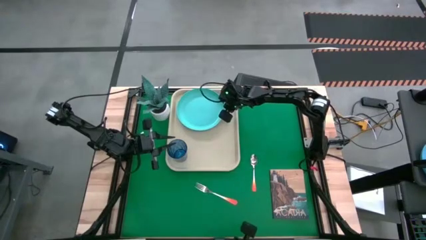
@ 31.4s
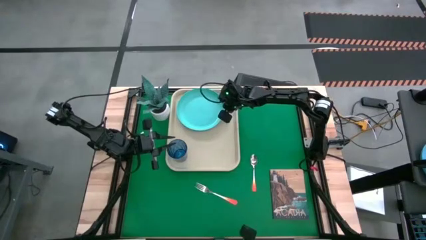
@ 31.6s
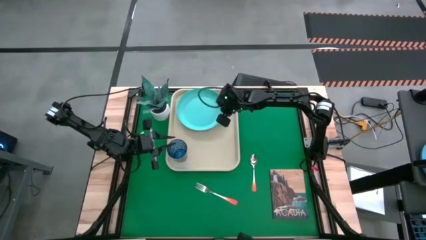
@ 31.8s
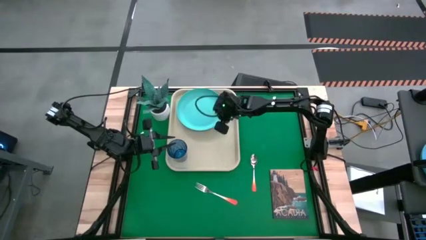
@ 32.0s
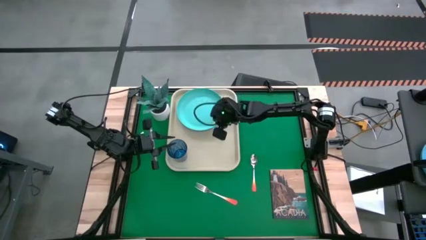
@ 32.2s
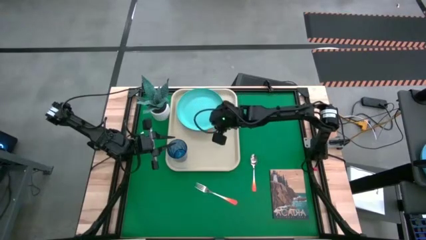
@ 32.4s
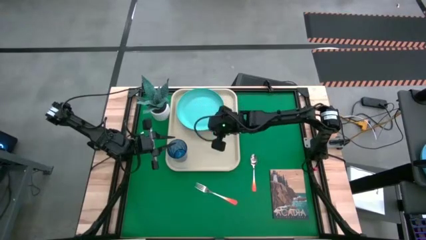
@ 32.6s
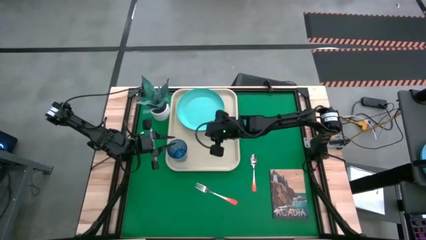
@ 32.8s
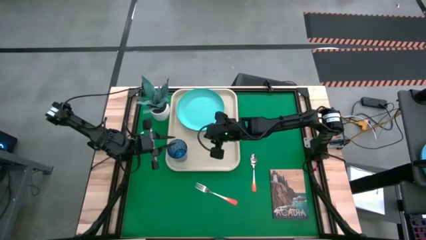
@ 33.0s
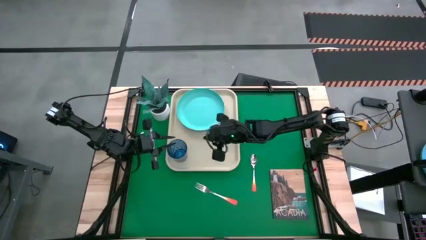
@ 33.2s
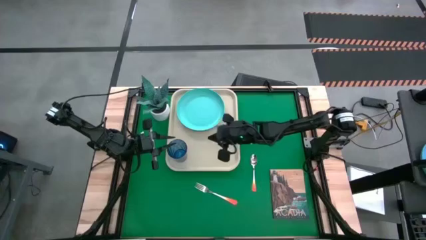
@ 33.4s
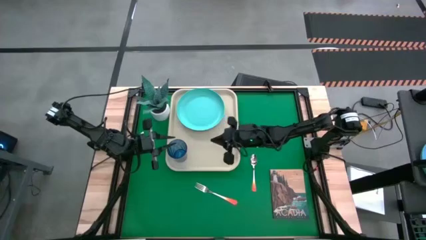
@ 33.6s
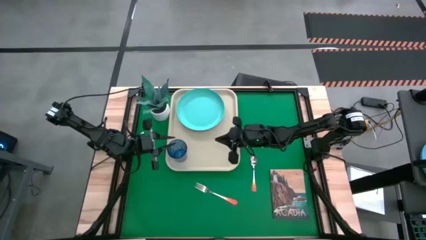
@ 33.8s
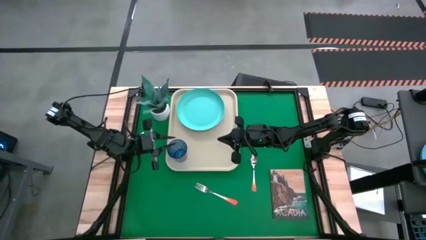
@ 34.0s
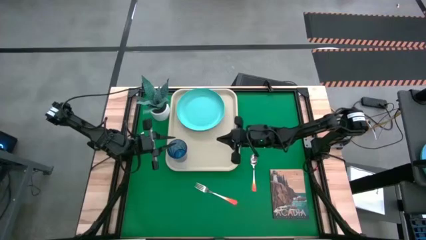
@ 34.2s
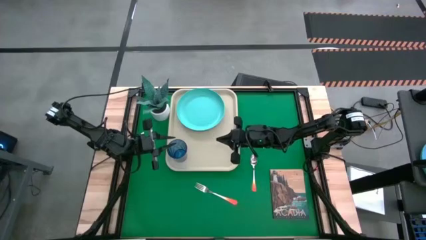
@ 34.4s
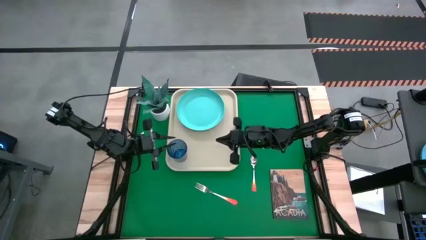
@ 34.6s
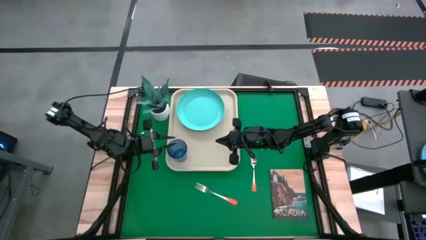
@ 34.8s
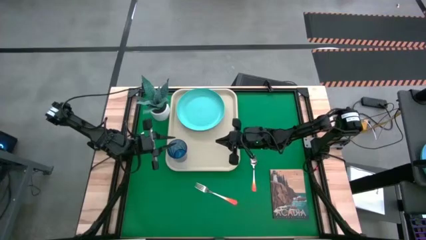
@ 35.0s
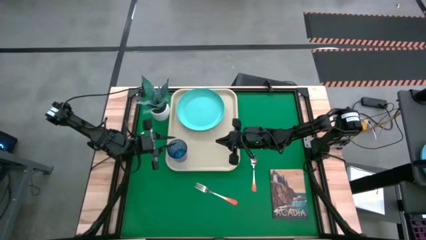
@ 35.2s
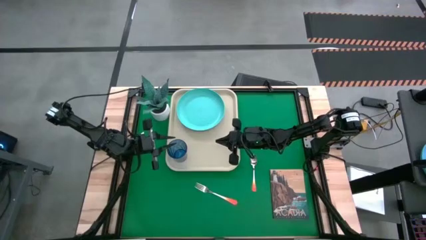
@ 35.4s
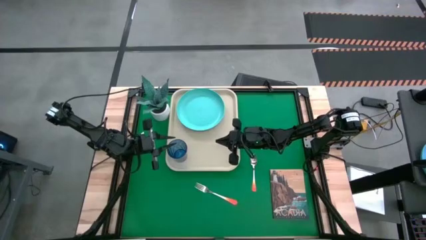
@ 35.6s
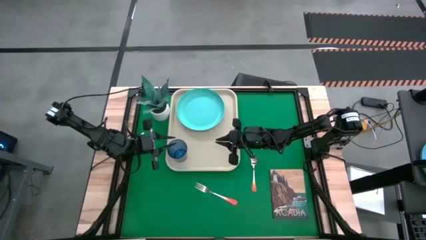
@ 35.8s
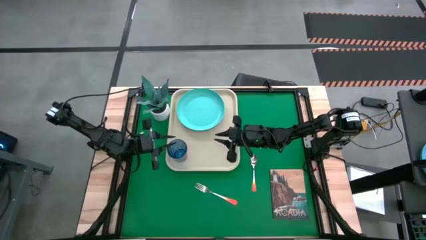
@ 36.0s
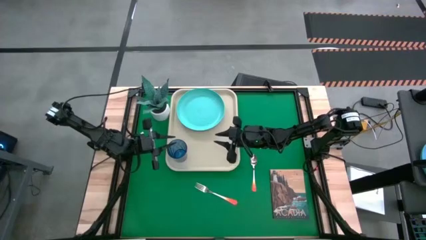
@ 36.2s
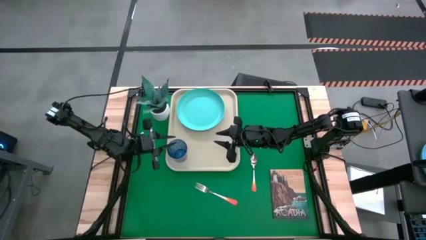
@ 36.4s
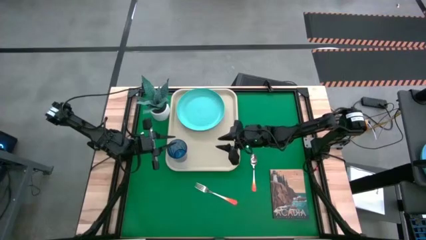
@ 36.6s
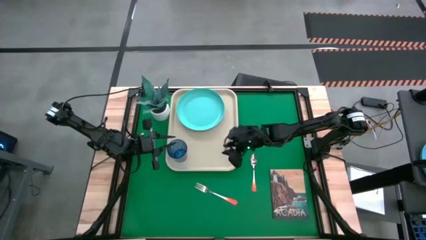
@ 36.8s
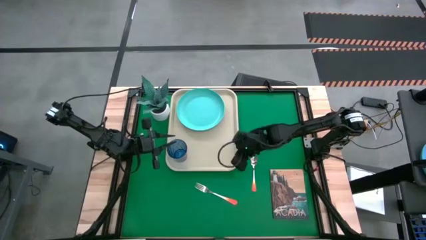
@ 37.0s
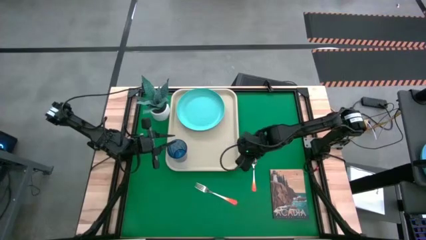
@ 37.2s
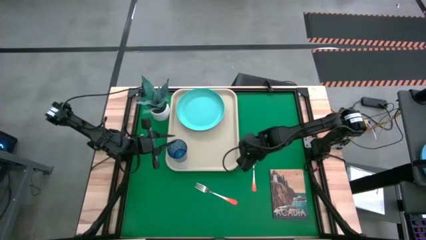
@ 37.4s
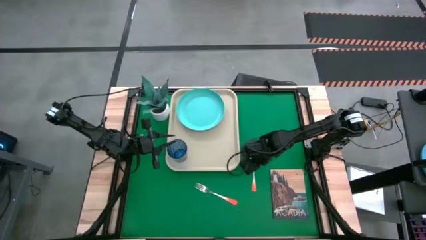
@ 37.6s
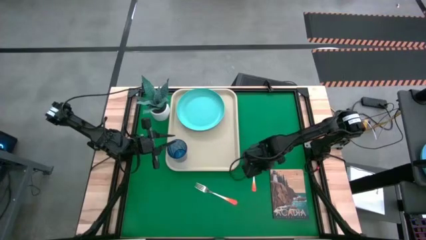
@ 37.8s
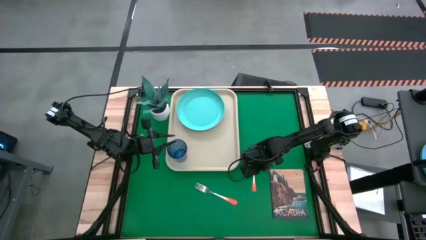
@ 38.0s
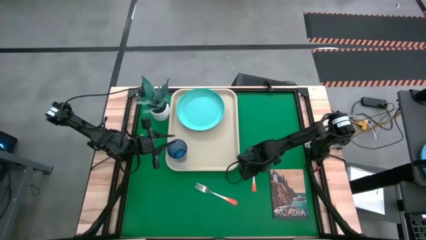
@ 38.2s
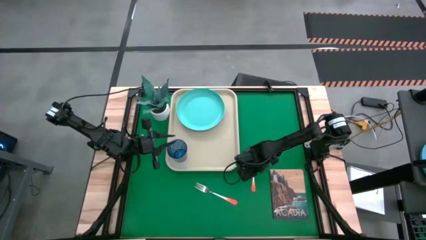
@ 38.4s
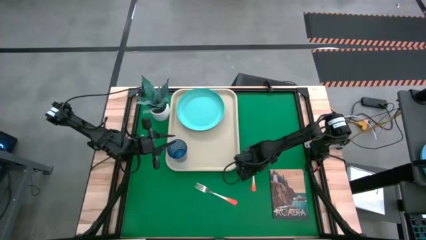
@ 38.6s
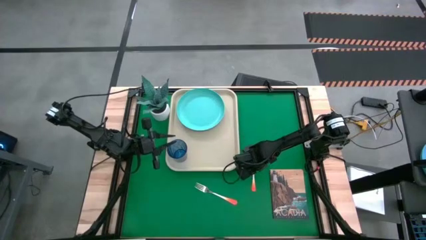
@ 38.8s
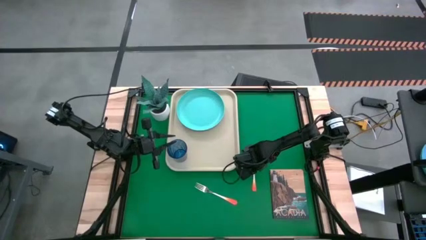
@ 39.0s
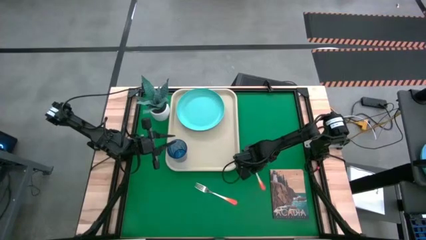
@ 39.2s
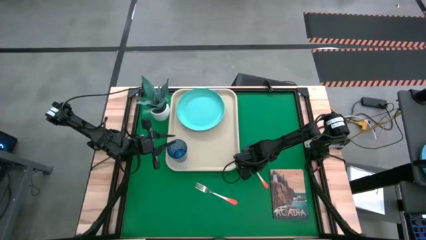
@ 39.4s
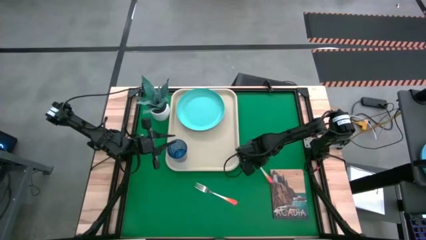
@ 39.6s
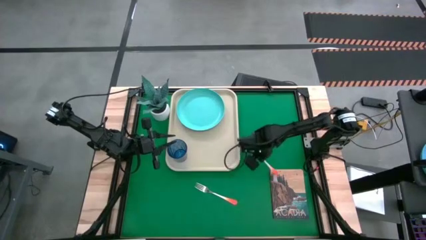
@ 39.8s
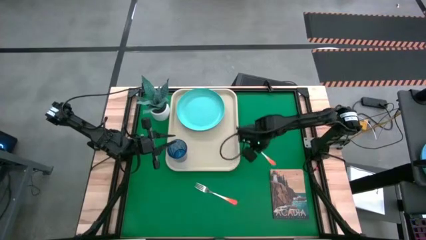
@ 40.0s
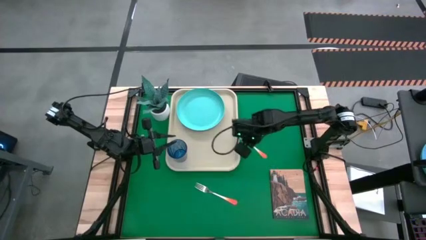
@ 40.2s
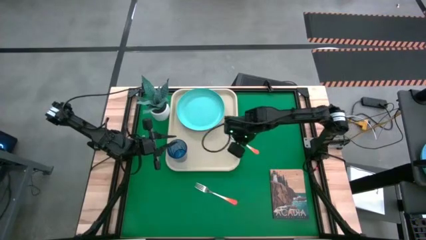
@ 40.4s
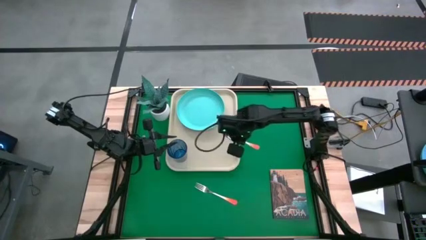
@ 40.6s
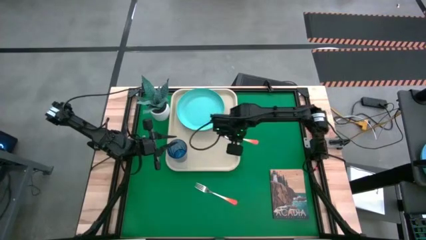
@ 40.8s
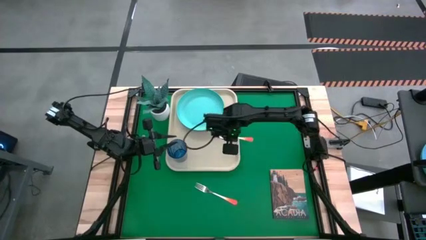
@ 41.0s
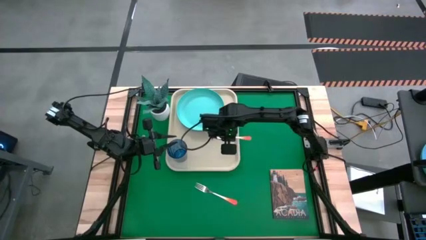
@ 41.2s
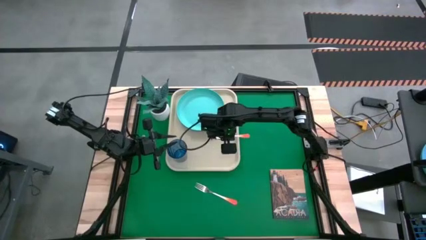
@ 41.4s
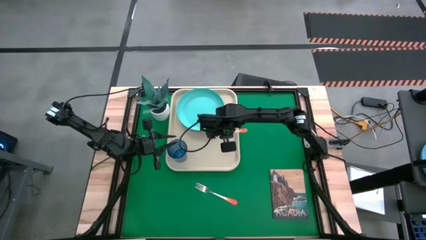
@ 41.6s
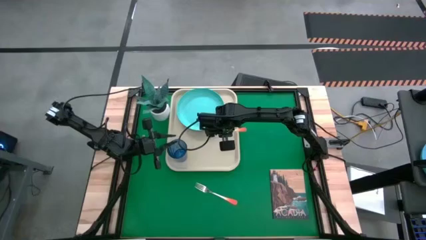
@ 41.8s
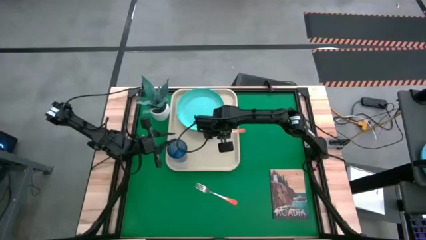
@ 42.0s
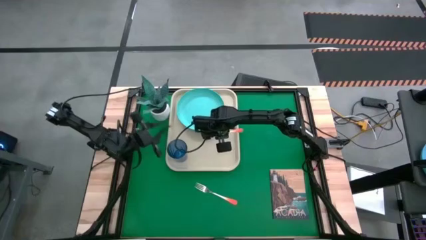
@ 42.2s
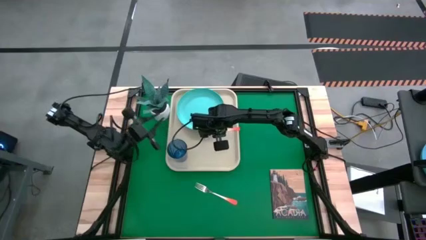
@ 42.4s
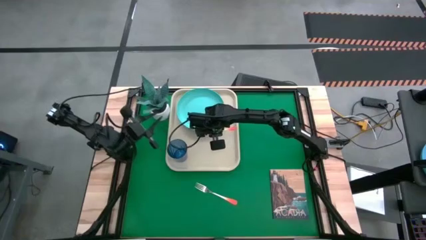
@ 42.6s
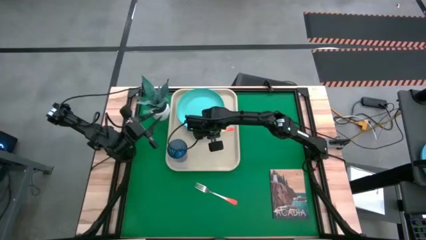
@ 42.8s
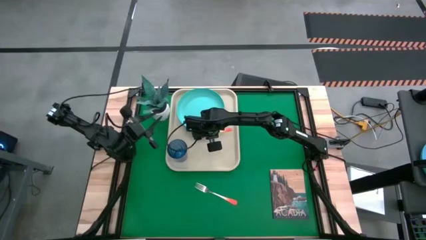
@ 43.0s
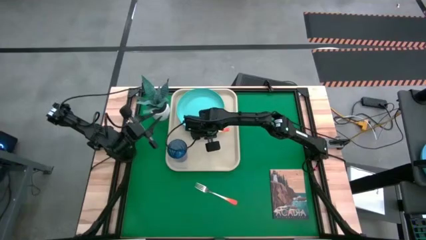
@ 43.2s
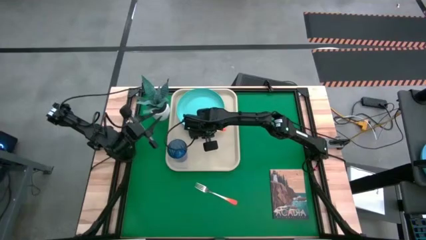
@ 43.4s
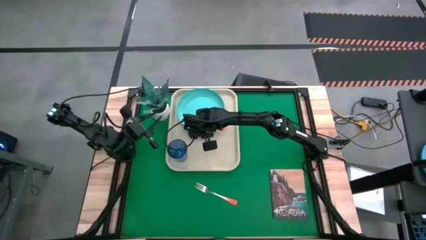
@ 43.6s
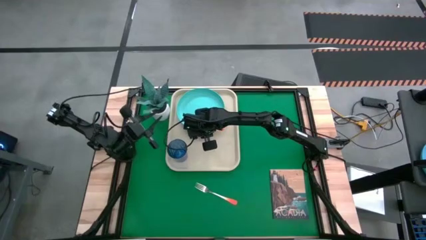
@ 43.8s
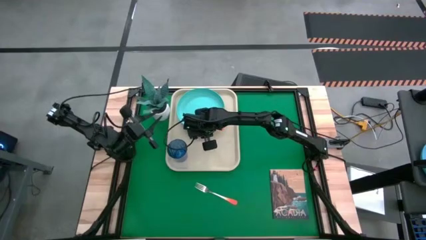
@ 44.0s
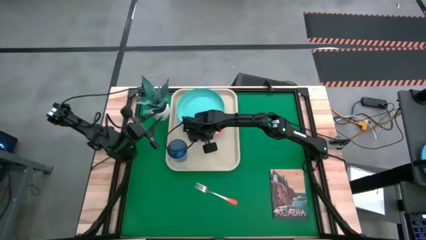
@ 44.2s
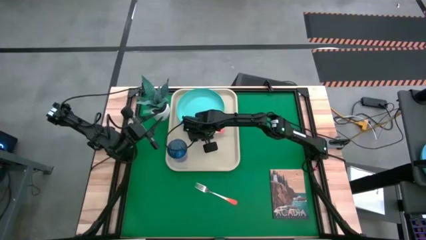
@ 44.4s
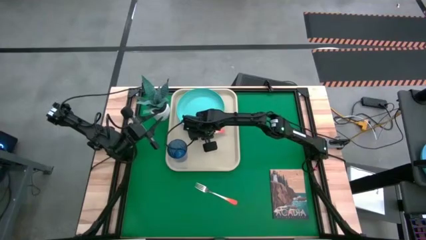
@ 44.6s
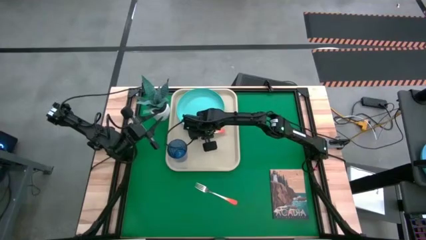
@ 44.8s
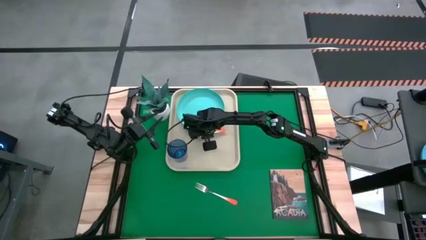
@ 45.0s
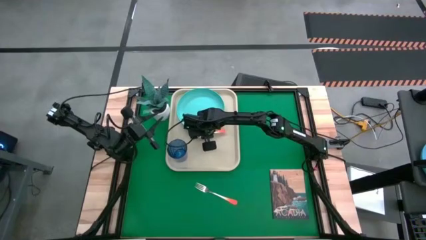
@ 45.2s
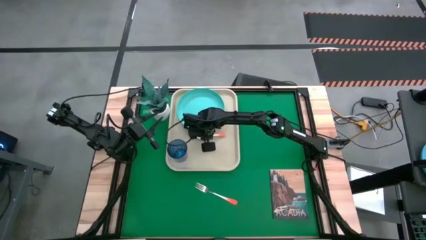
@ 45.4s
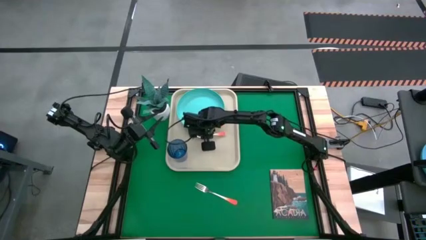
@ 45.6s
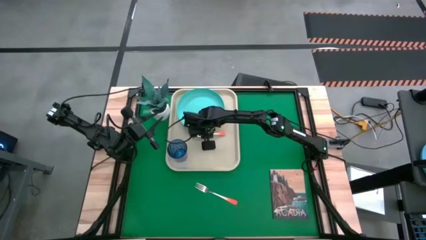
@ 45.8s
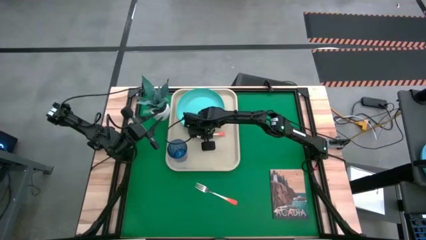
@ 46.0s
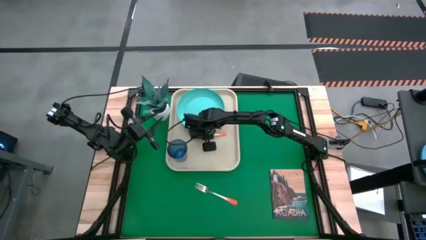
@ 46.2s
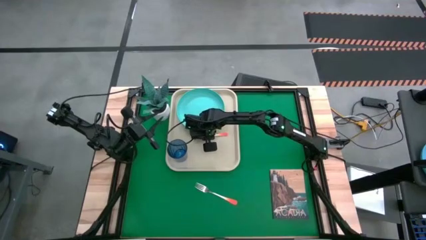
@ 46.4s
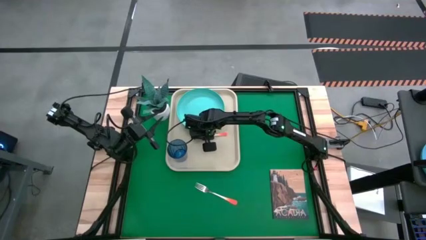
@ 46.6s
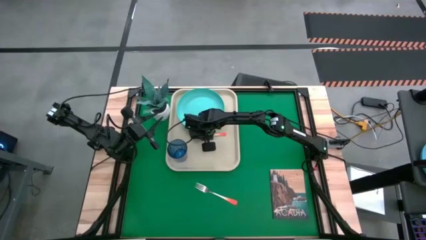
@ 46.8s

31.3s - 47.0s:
Task: Pick and place plate/cup/fork/spoon on tray
Put the orange spoon on the serving tray to the left of the blue plate
